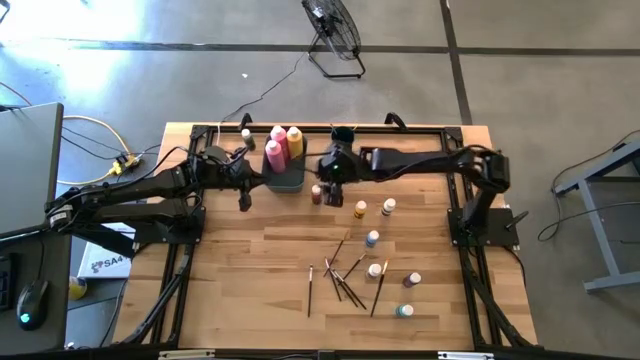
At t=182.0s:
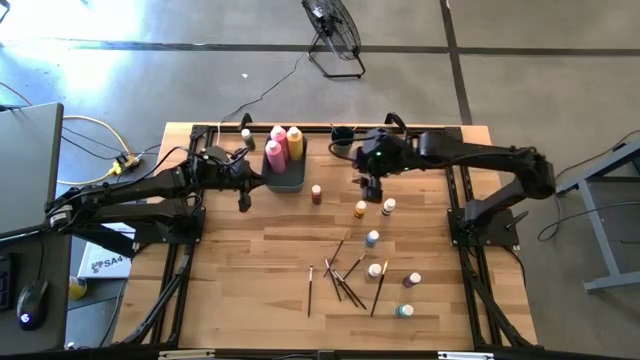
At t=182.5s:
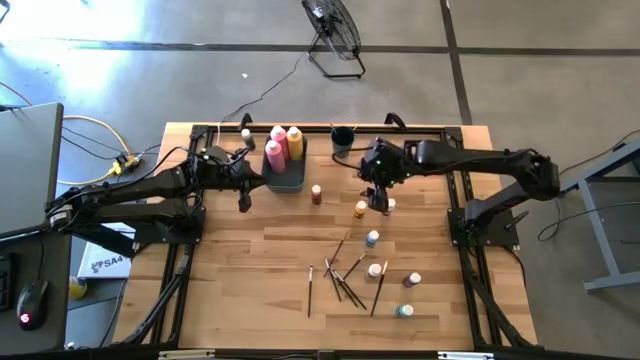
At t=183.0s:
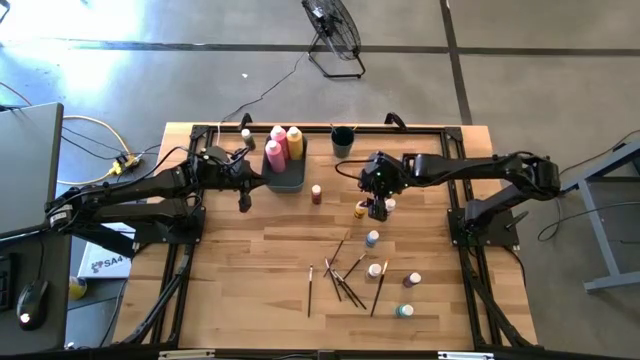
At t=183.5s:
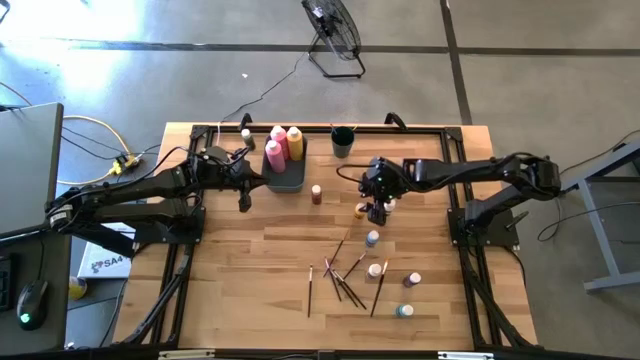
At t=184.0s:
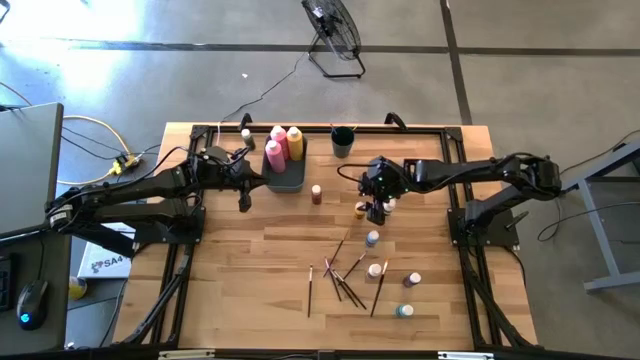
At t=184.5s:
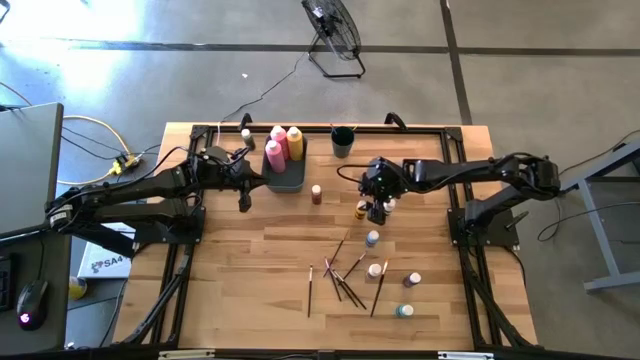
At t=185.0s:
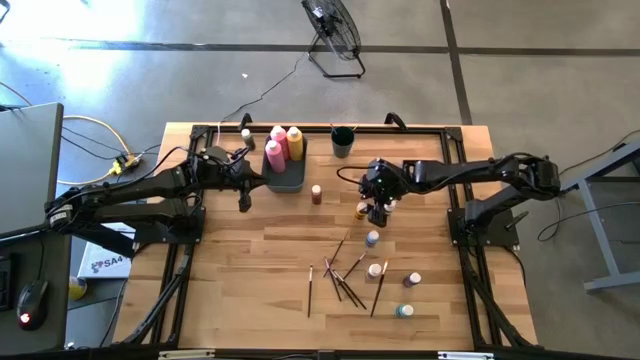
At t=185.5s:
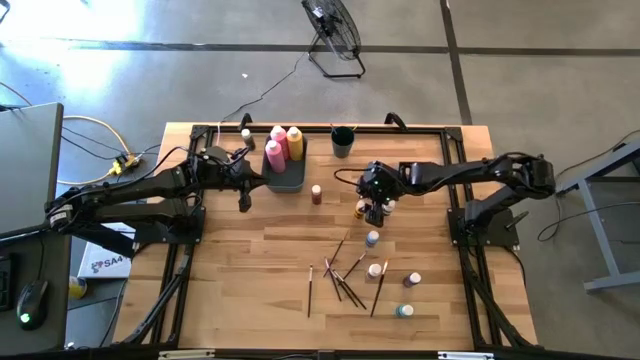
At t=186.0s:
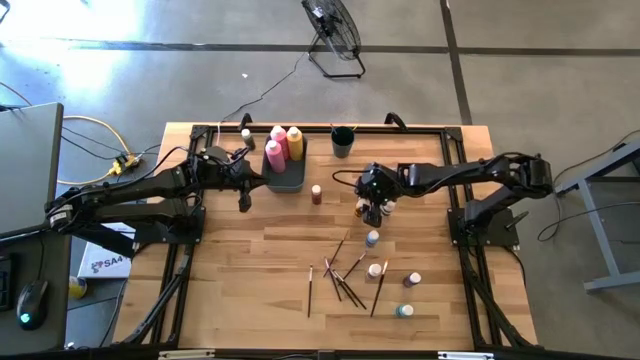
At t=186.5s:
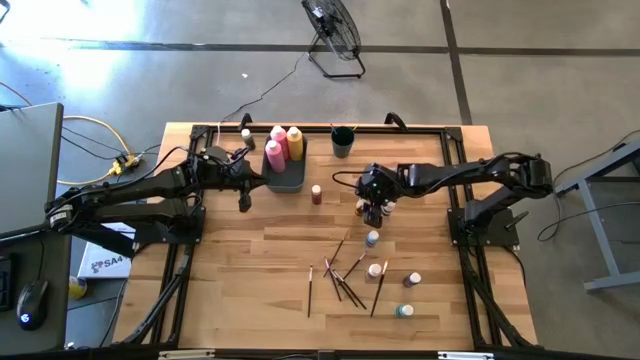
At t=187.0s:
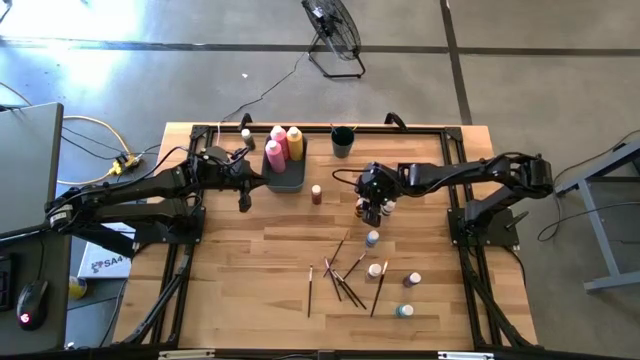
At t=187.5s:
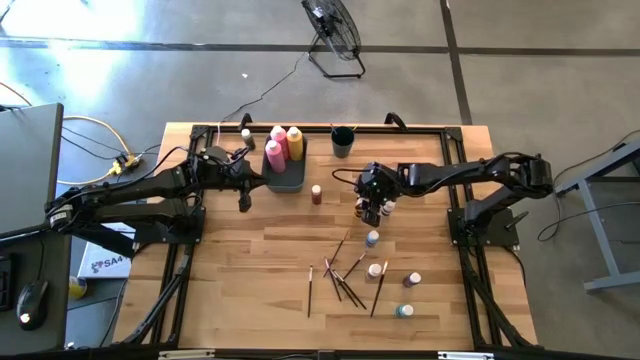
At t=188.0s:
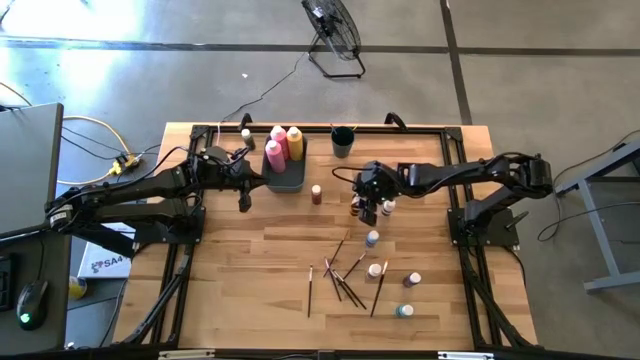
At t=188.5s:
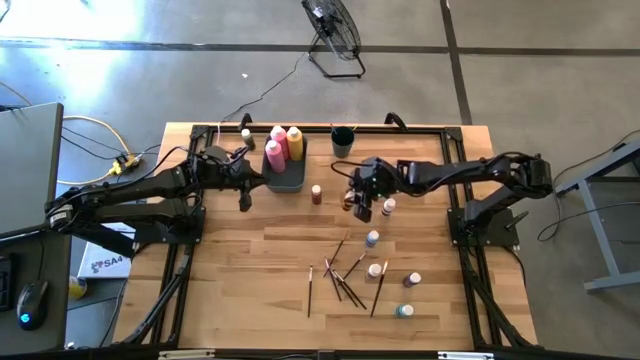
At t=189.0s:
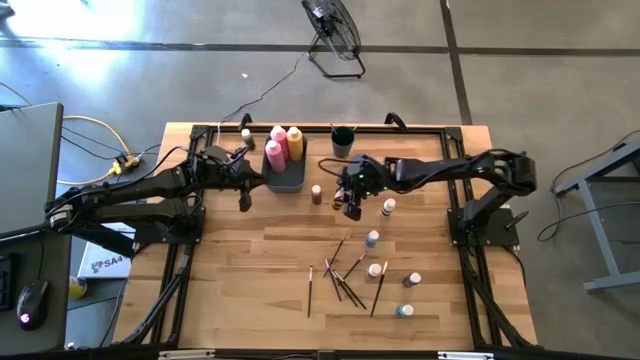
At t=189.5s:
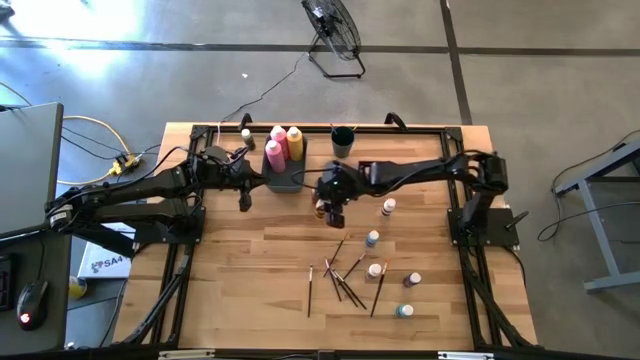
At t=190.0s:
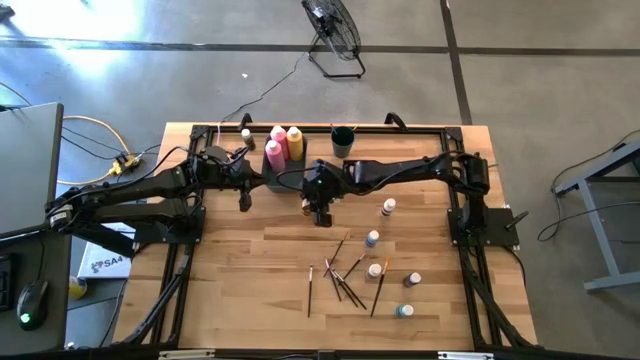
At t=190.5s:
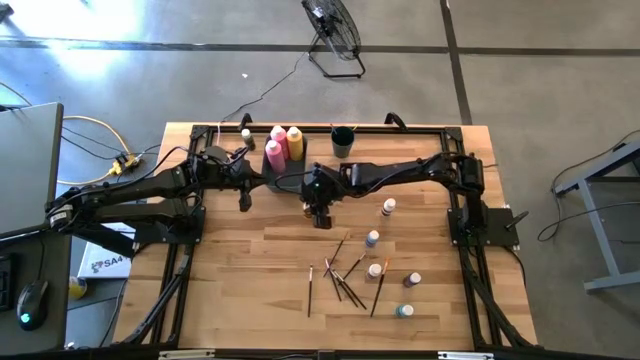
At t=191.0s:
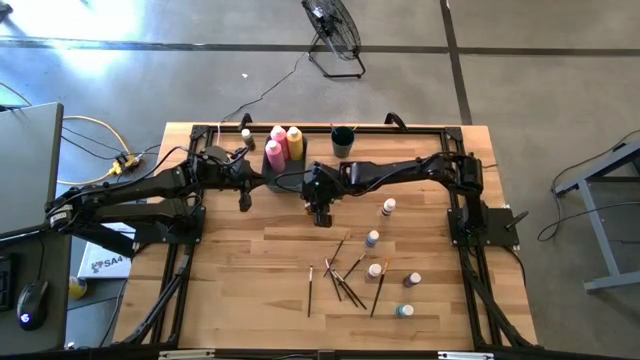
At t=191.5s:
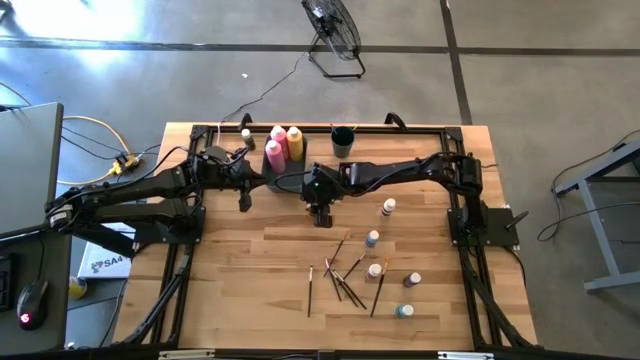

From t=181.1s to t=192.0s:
Task: Pick & Place Paint Supplies
Move the small yellow paint bottle from right to the middle of the table

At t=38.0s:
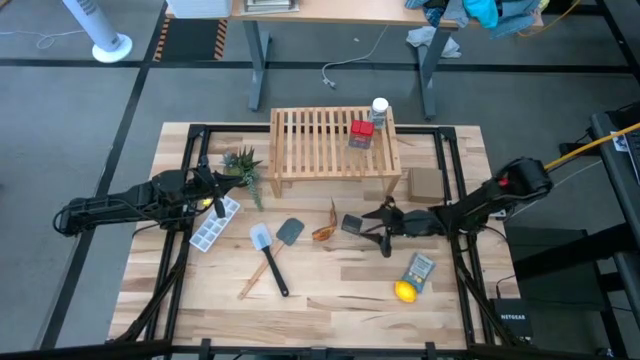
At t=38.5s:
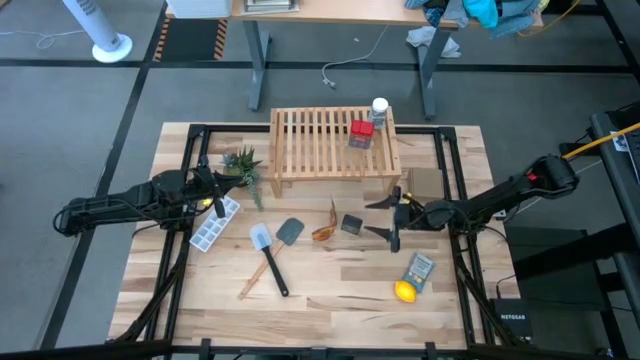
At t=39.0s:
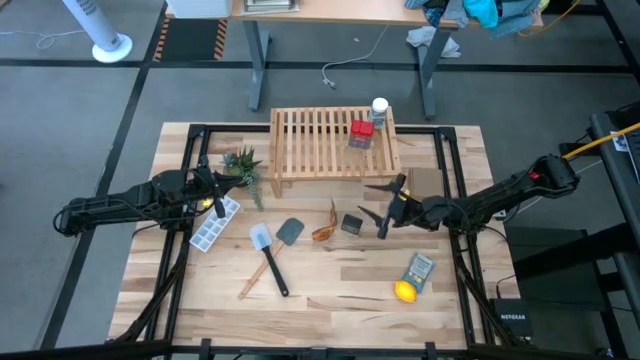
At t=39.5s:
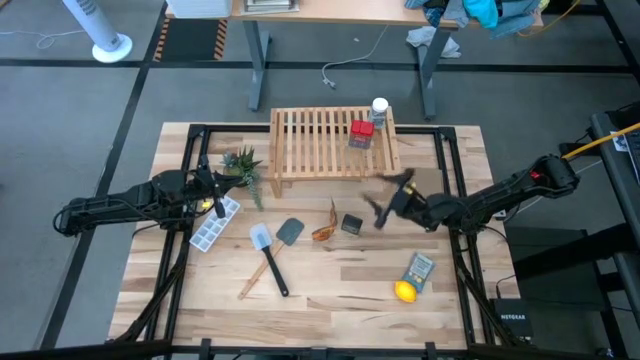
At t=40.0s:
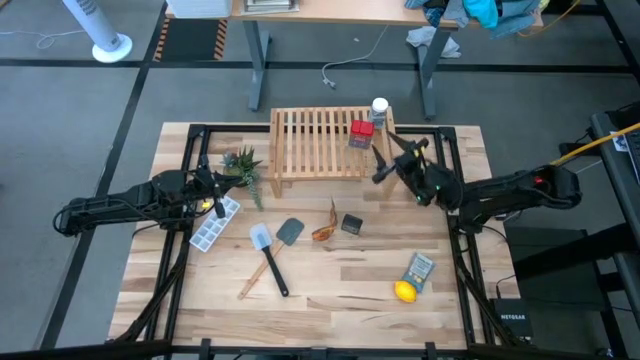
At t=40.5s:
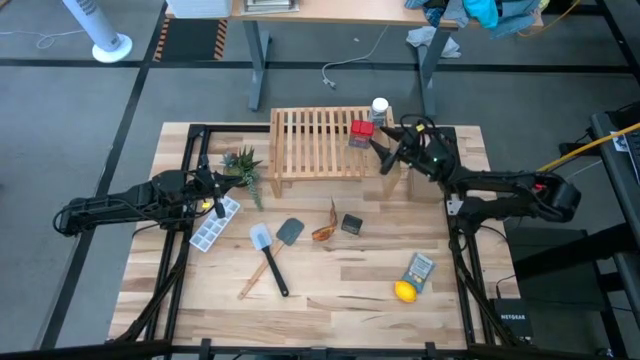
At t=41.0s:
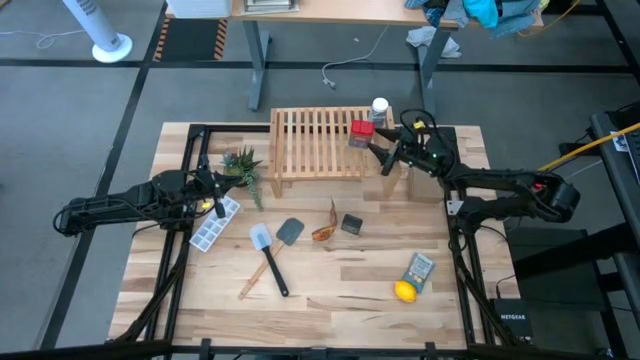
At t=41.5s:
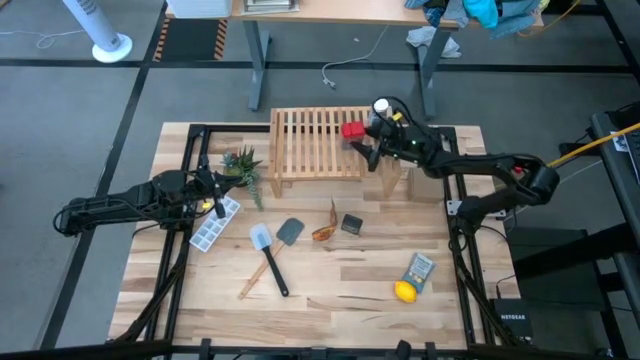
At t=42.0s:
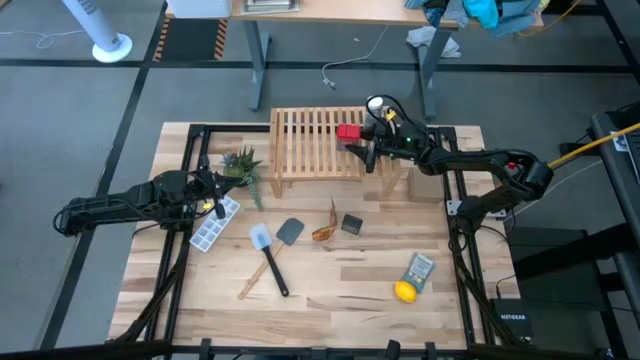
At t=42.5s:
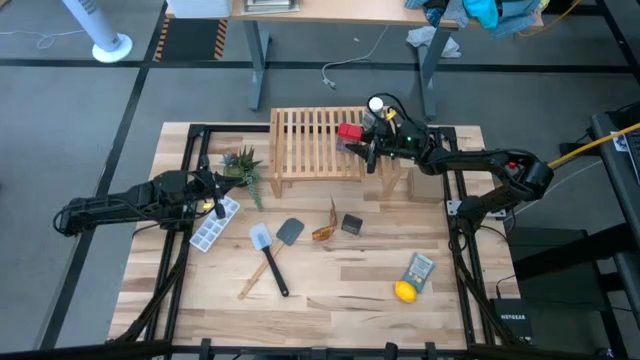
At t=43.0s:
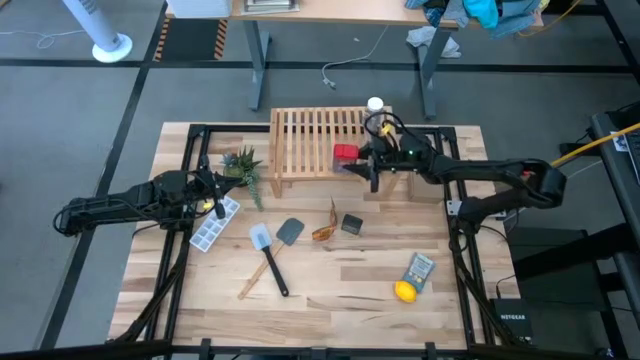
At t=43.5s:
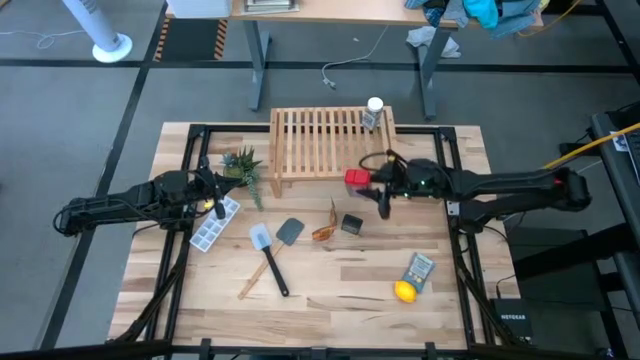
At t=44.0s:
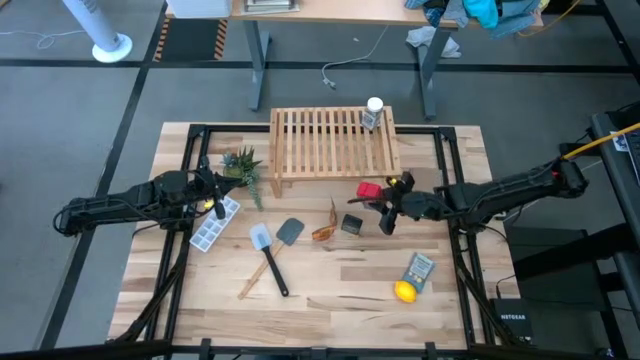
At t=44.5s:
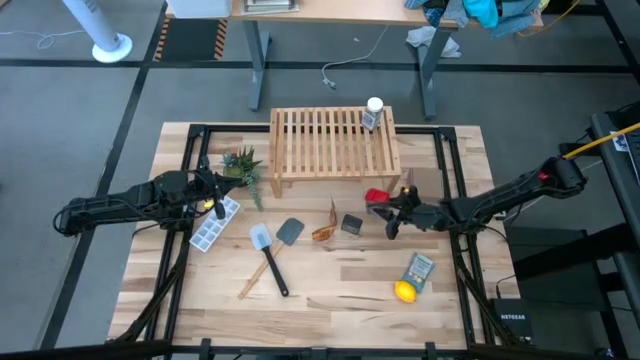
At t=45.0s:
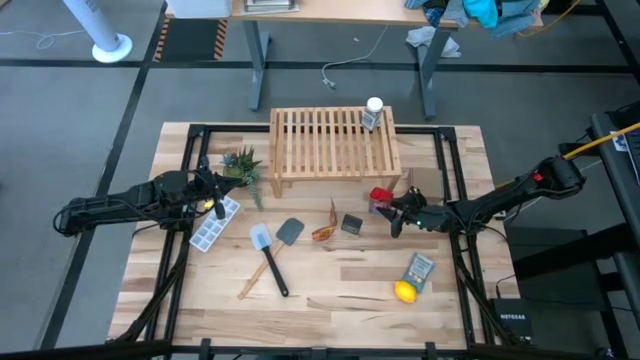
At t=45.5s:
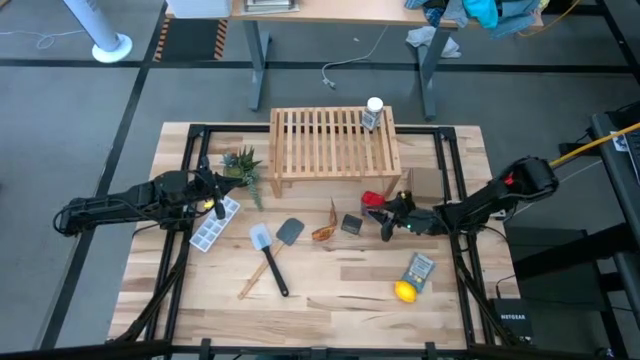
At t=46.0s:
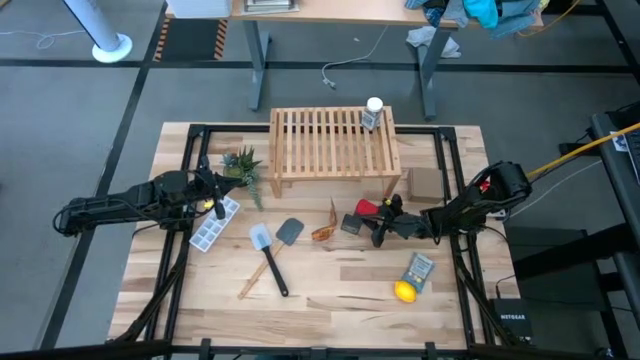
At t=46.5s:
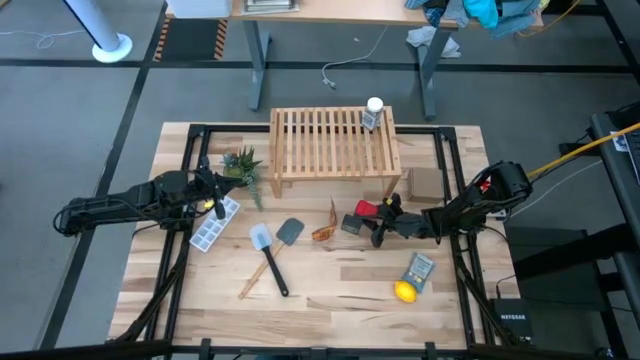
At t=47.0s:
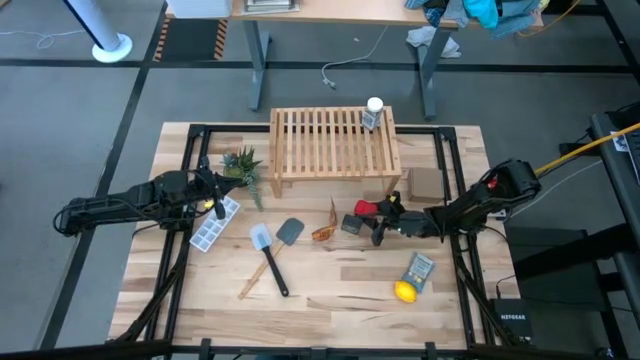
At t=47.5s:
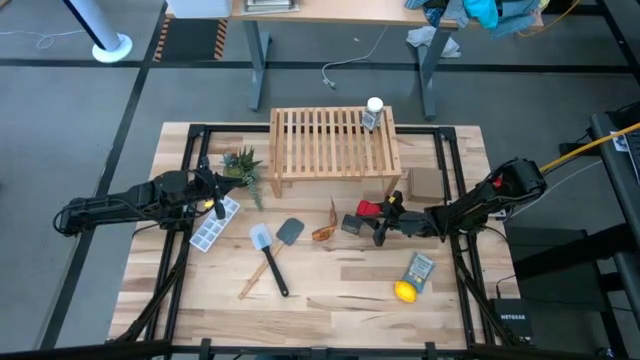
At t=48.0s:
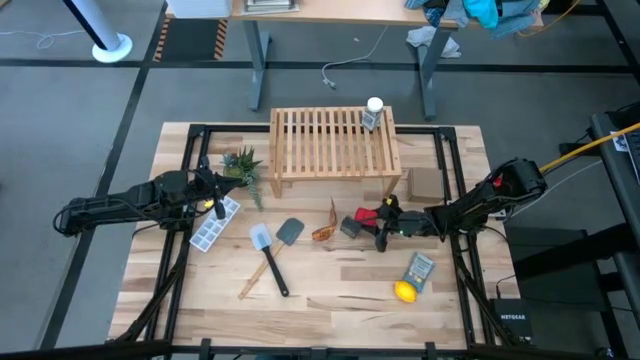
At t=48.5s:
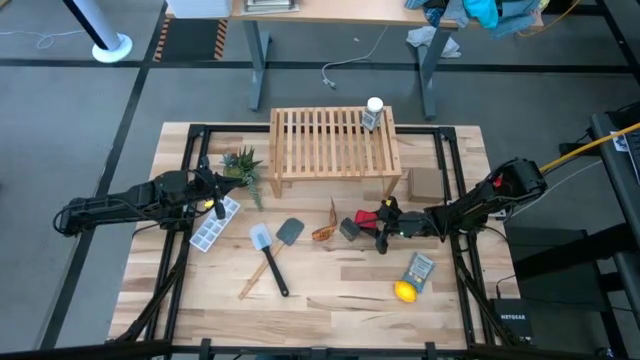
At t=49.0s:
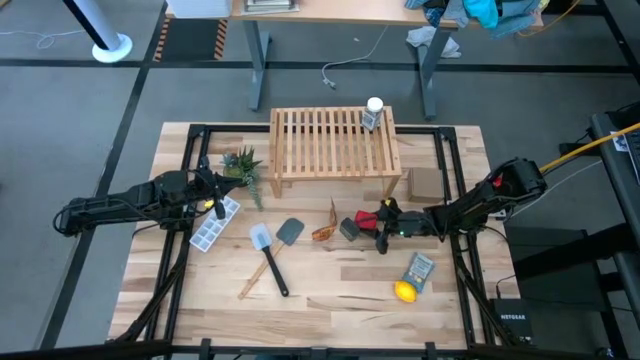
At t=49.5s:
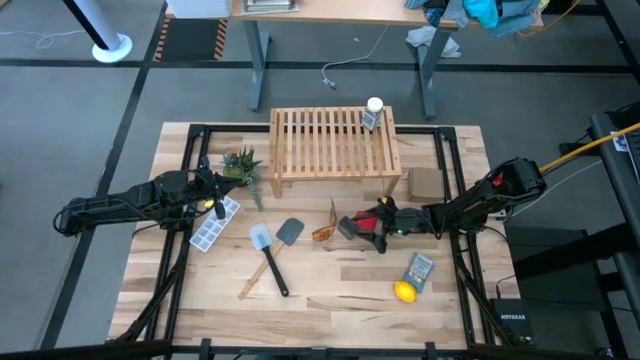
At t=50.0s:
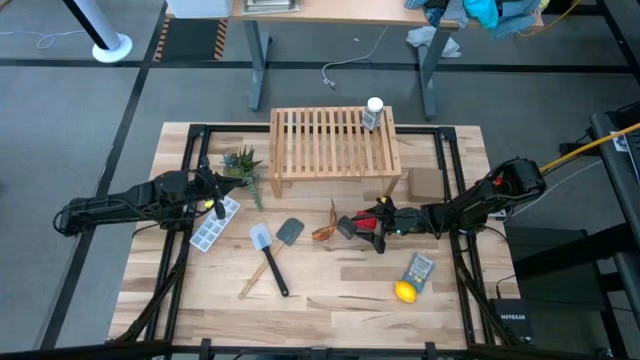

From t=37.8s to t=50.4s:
Task: Shelf spices
Remove the red seasoning can from the shelf
